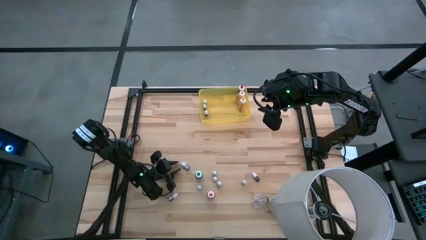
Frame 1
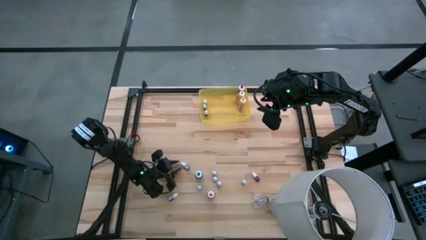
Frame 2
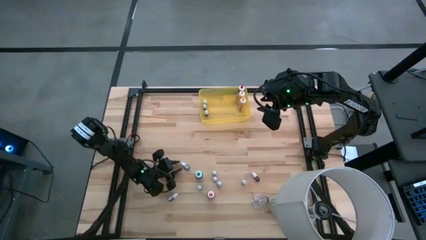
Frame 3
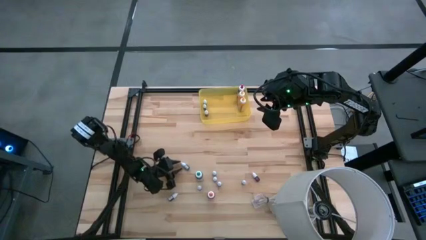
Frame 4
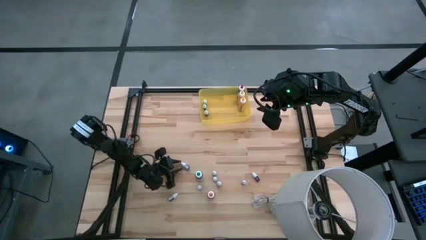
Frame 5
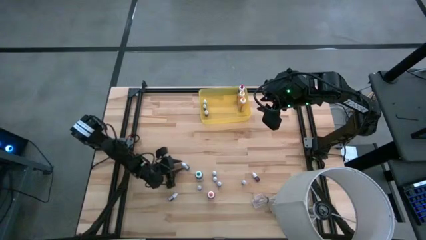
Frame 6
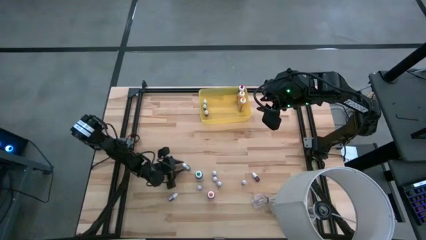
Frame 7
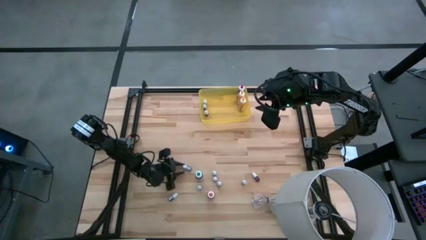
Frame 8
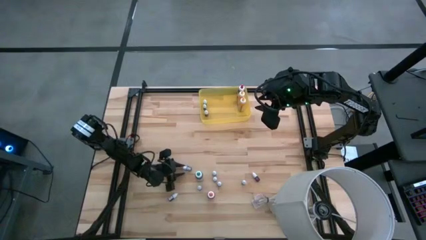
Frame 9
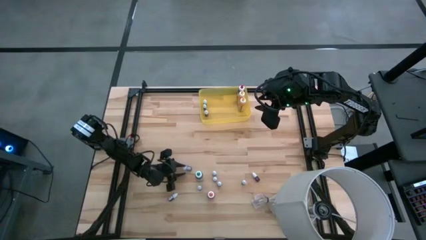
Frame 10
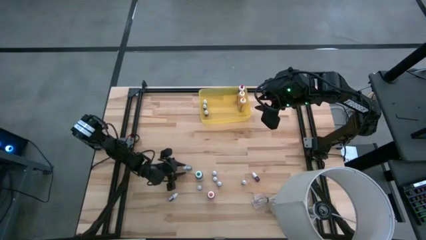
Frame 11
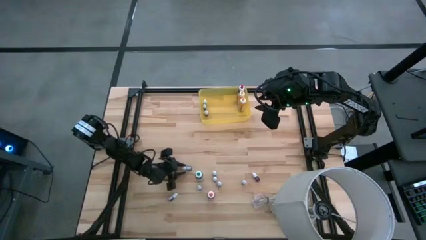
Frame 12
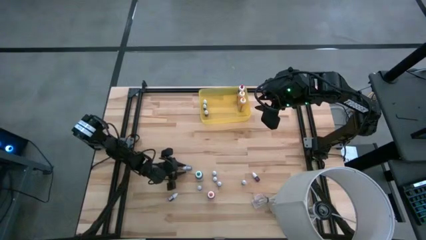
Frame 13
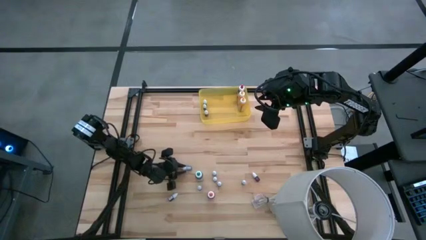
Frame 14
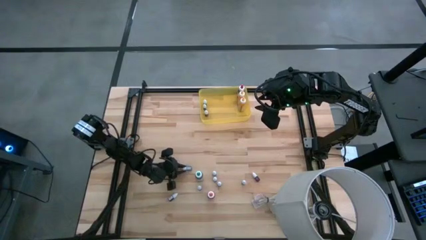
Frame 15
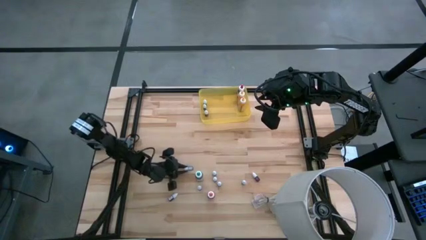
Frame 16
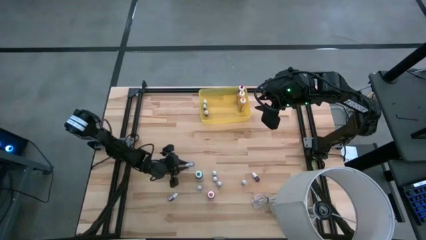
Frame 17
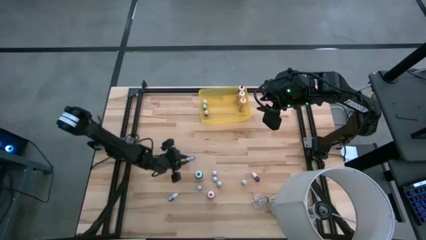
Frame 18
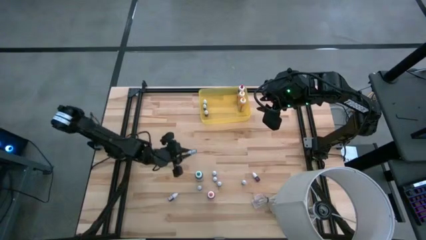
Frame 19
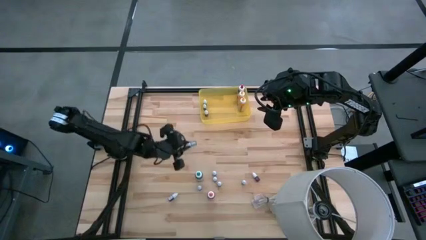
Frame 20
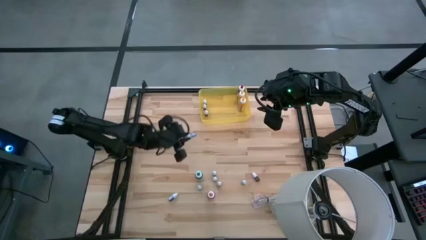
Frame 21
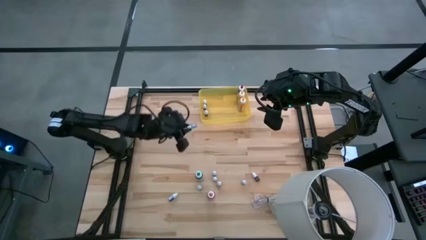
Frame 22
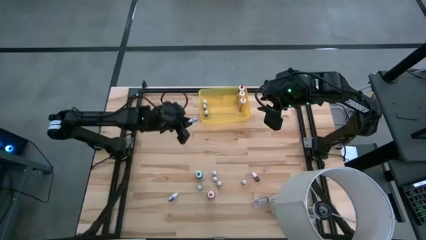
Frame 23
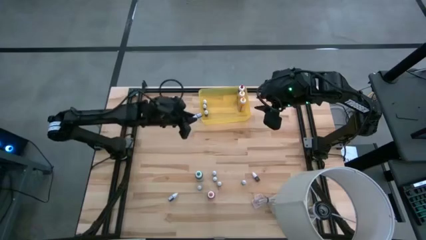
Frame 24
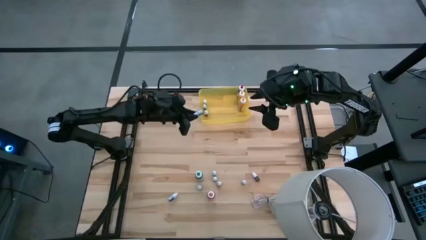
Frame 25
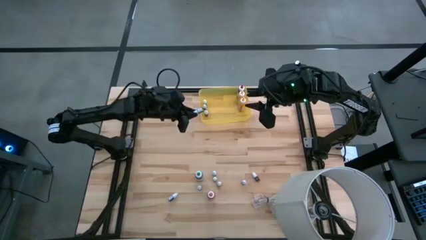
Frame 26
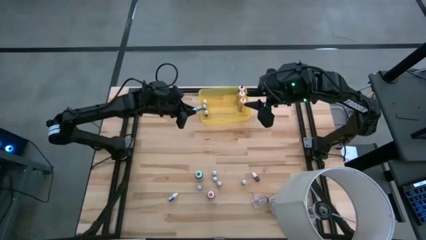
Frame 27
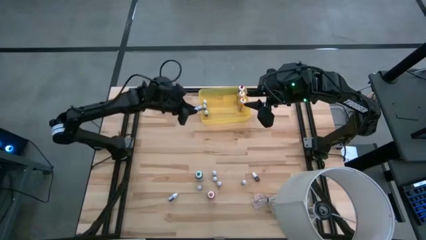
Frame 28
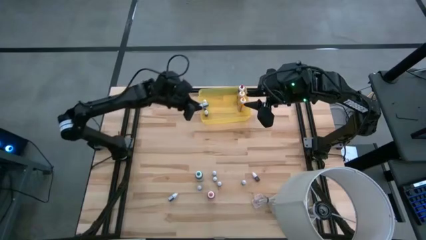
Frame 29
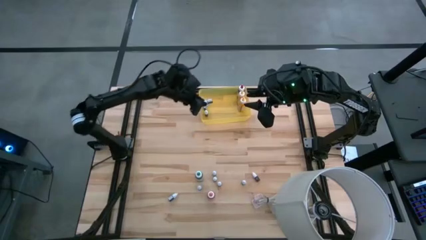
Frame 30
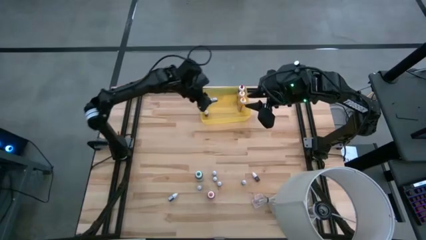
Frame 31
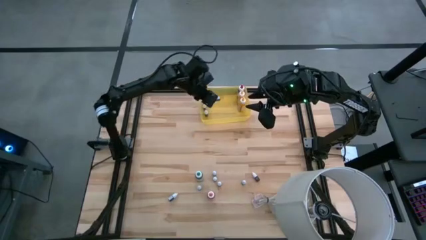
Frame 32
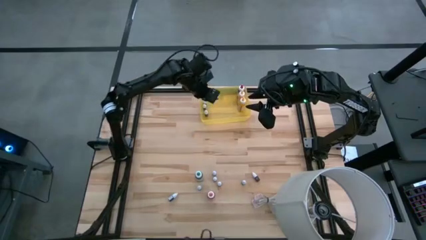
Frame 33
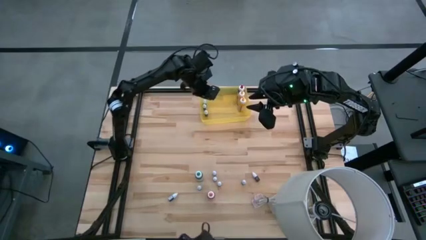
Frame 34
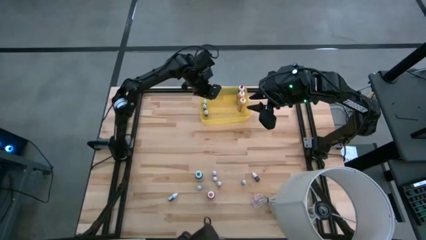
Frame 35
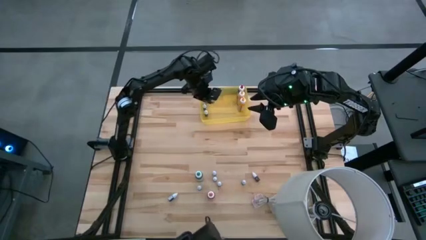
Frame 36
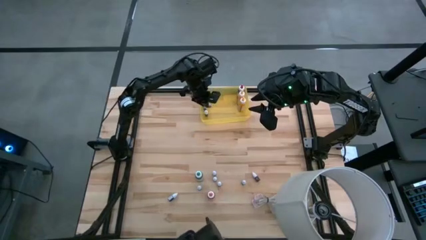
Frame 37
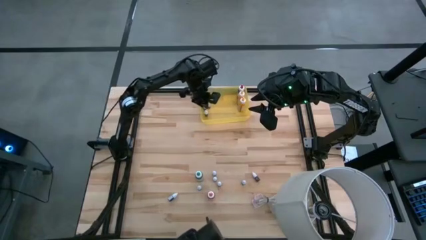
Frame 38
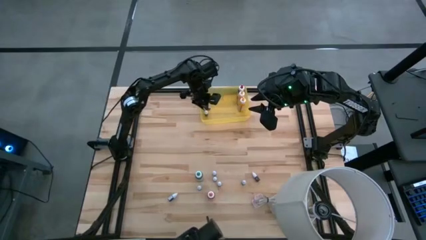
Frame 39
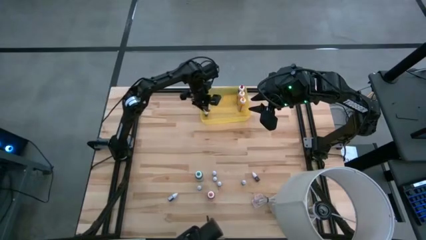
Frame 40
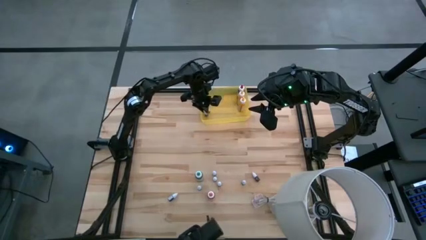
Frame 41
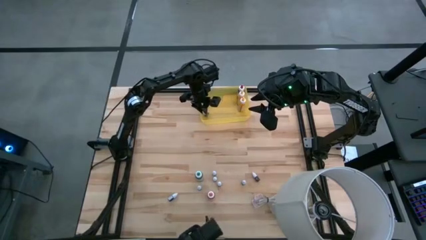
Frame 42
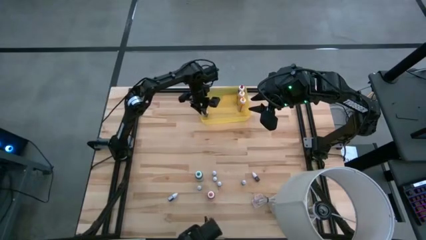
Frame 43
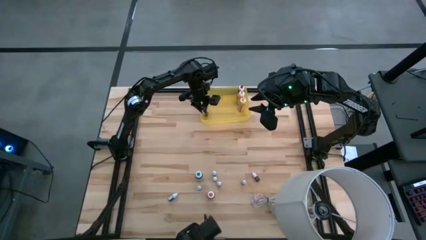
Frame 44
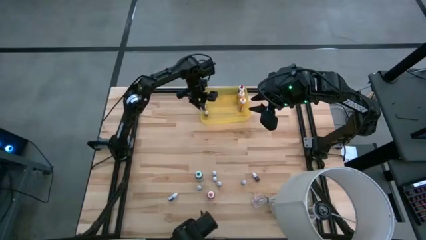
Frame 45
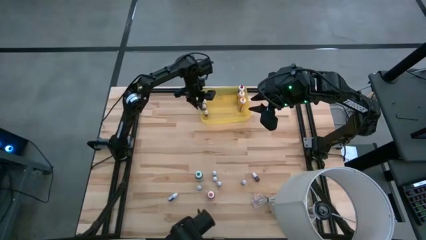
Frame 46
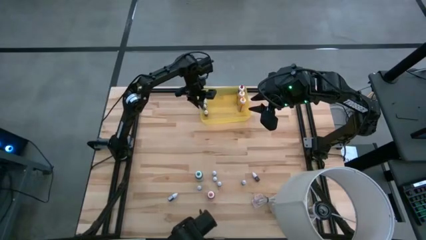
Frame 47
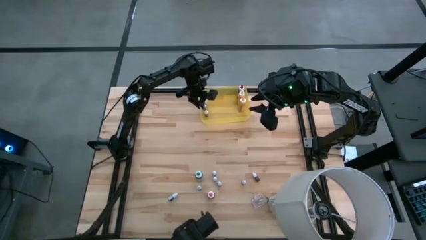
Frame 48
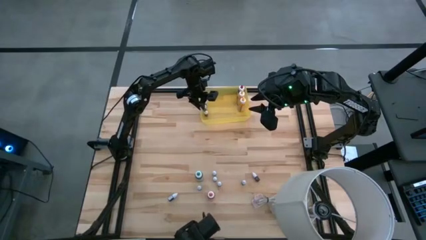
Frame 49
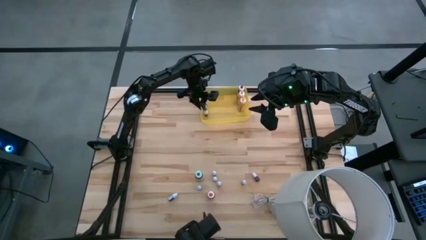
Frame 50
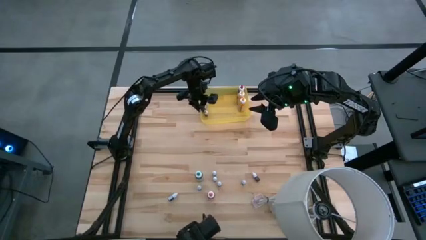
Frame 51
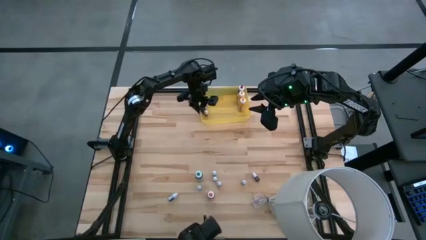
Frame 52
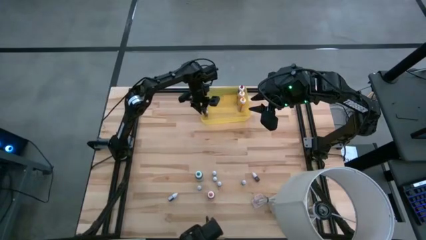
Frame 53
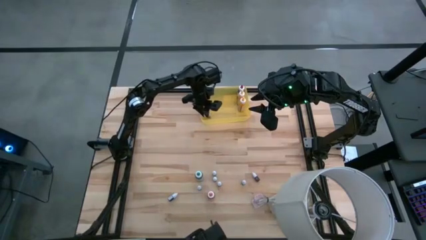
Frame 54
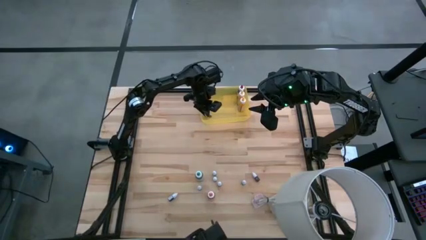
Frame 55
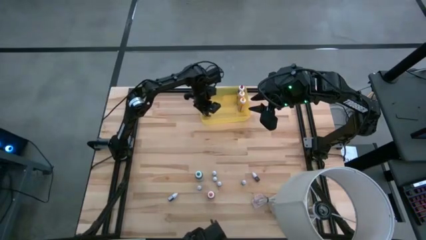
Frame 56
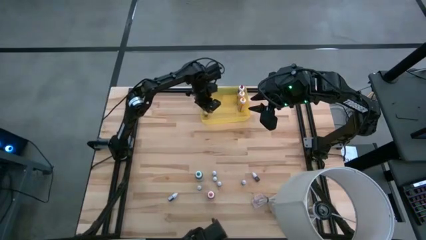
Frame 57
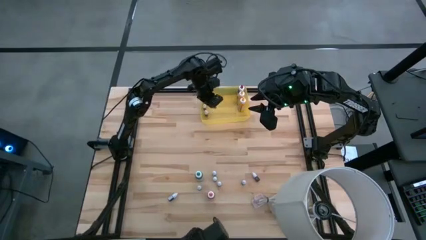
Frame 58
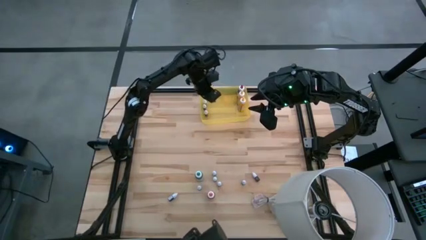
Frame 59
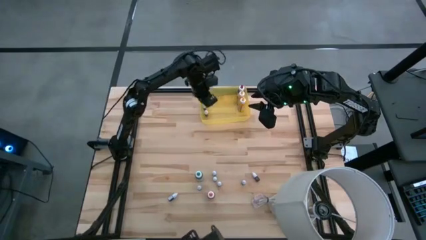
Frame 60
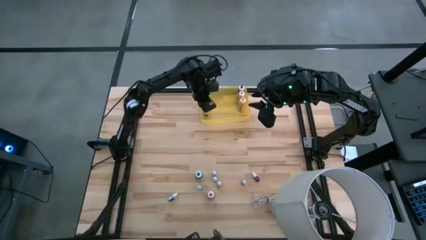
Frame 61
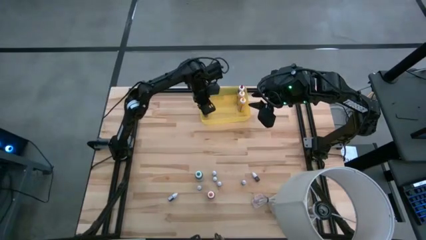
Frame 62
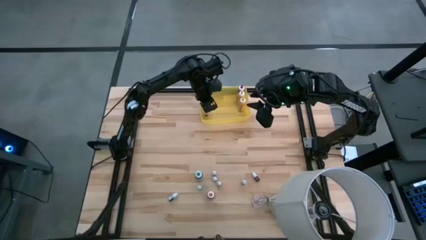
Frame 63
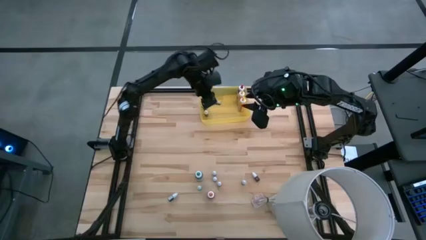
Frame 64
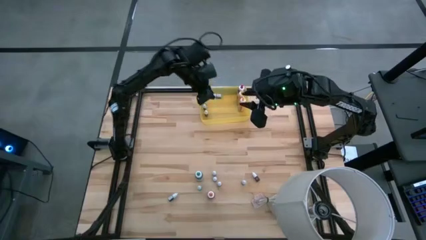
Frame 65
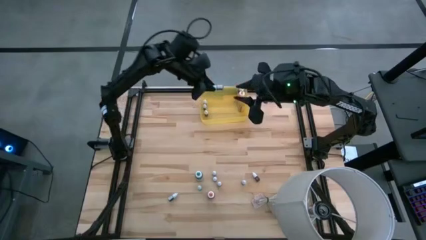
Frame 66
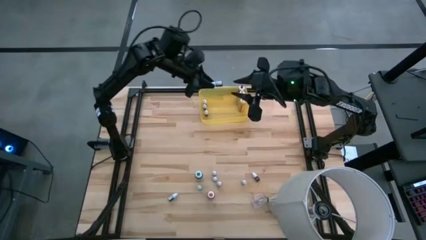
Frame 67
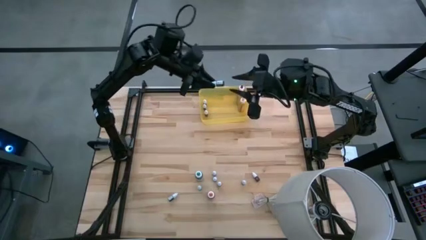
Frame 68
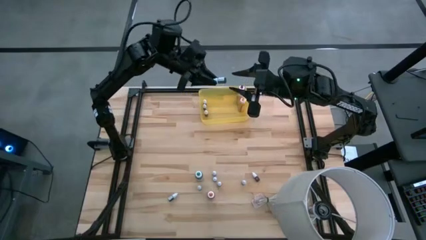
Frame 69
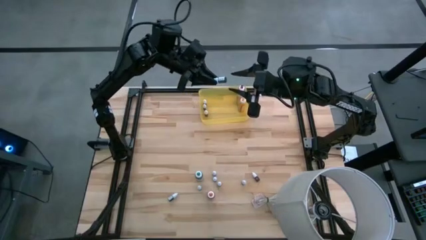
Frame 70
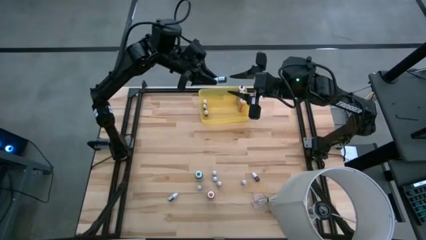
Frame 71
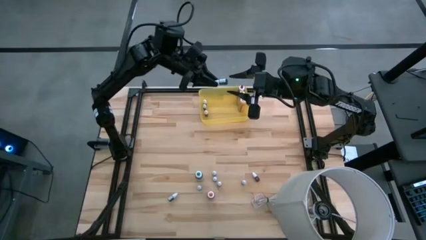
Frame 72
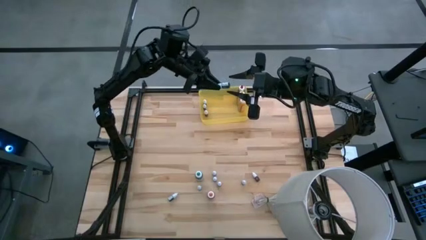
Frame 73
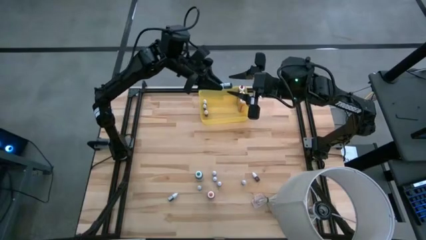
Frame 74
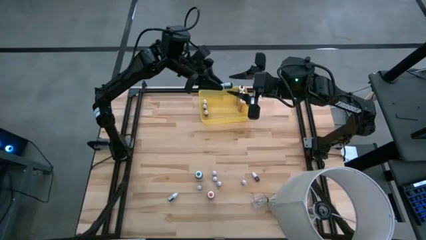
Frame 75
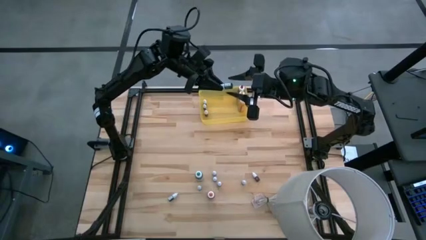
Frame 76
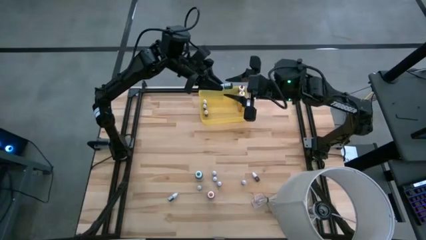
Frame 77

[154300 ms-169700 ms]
Task: Pick & Place food coloring
Put the left small green food coloring bottle into the yellow bin
